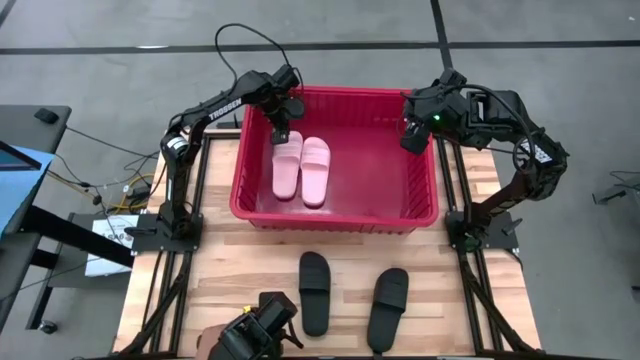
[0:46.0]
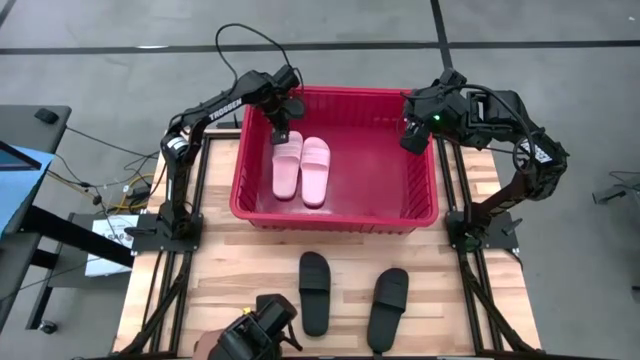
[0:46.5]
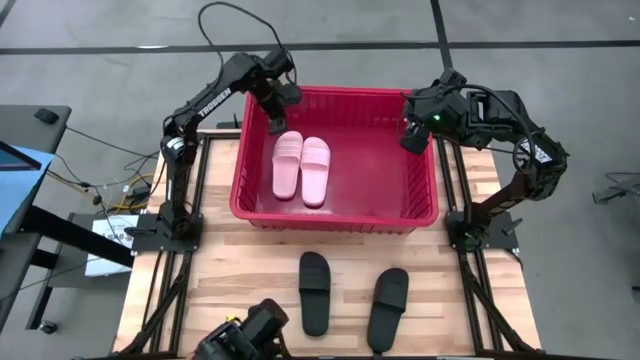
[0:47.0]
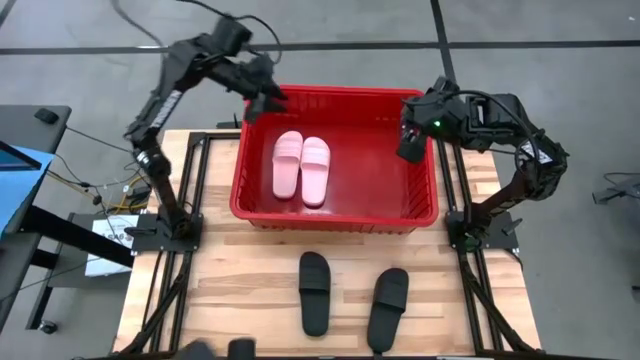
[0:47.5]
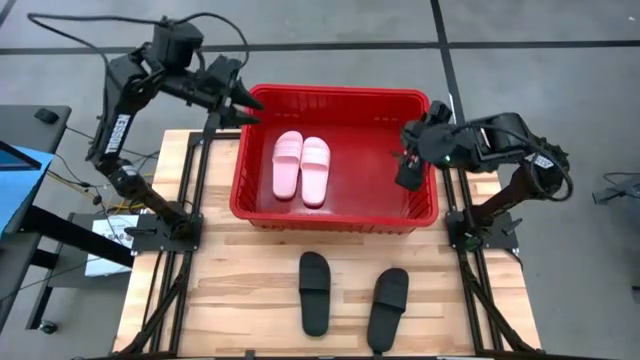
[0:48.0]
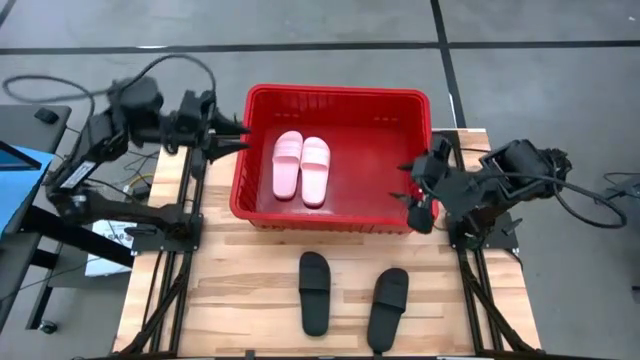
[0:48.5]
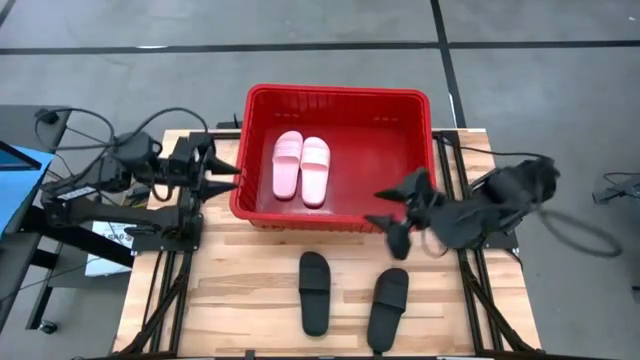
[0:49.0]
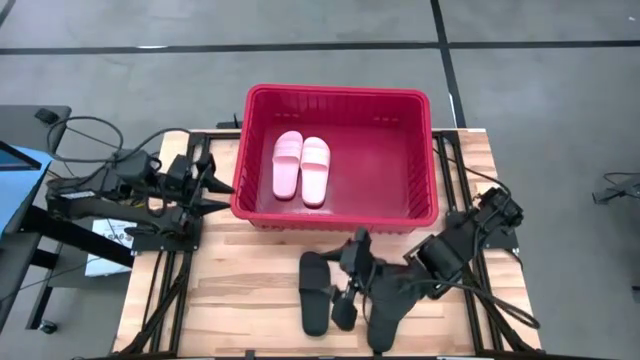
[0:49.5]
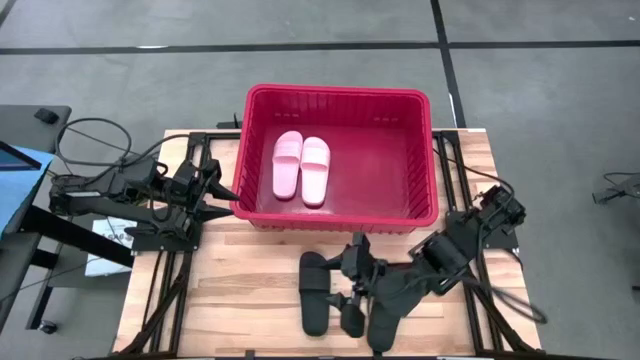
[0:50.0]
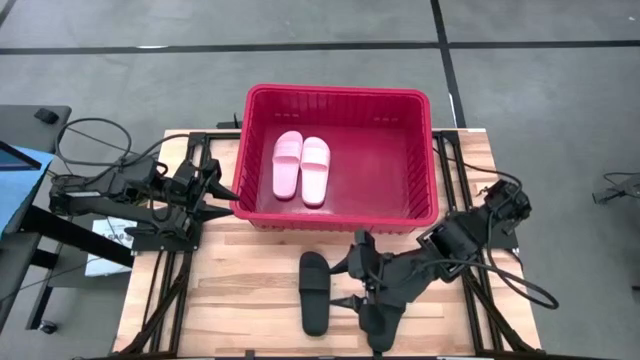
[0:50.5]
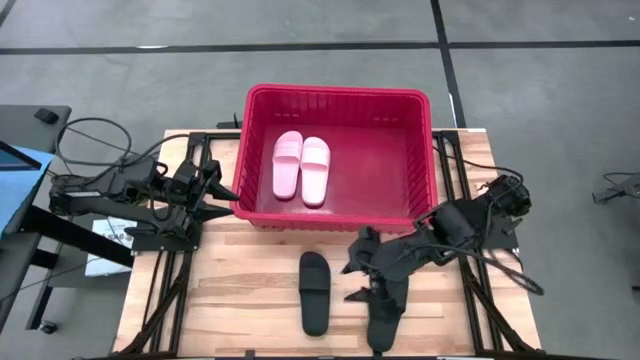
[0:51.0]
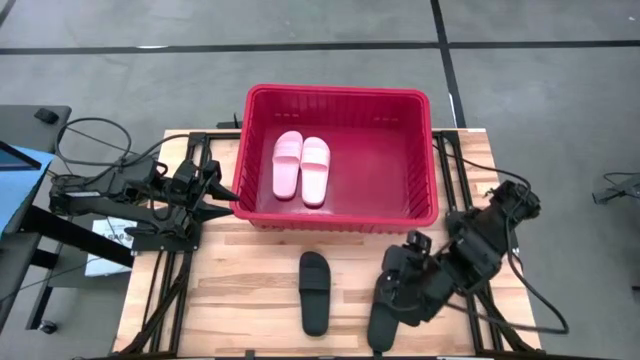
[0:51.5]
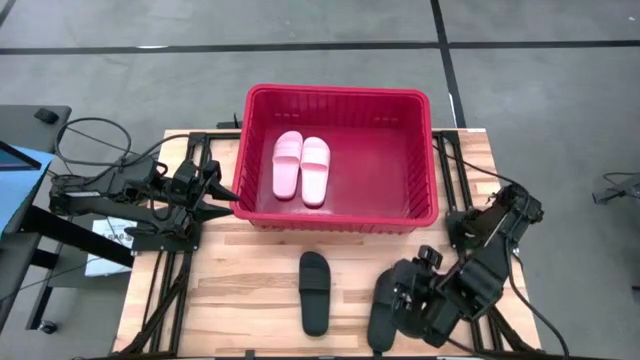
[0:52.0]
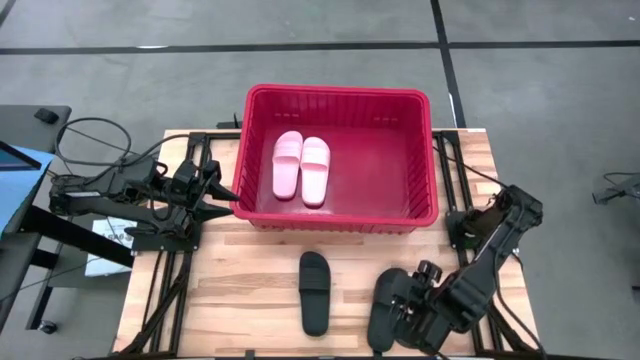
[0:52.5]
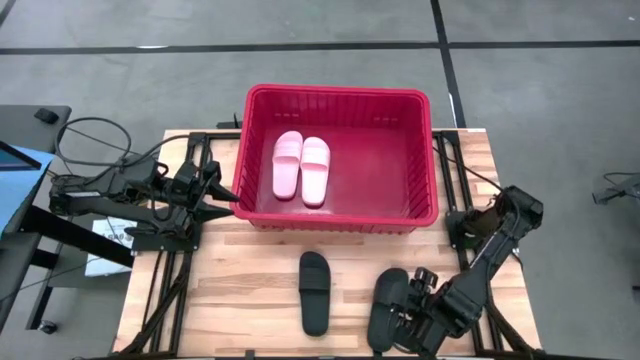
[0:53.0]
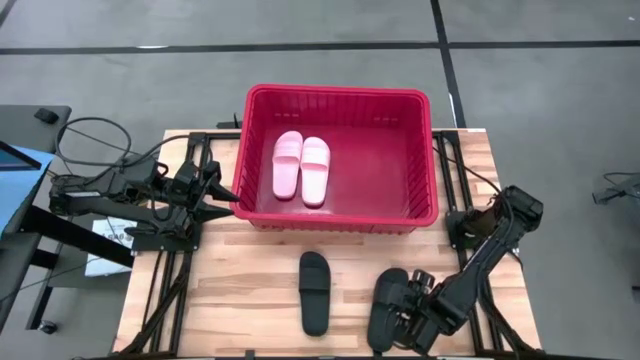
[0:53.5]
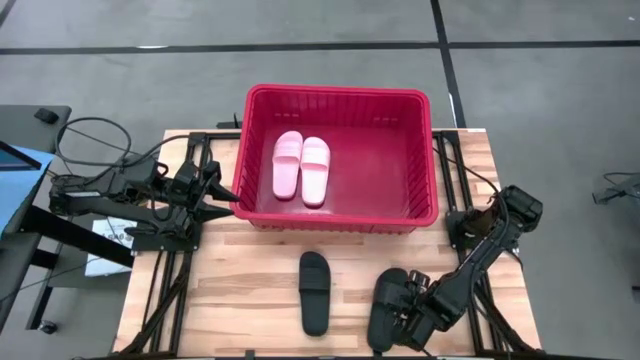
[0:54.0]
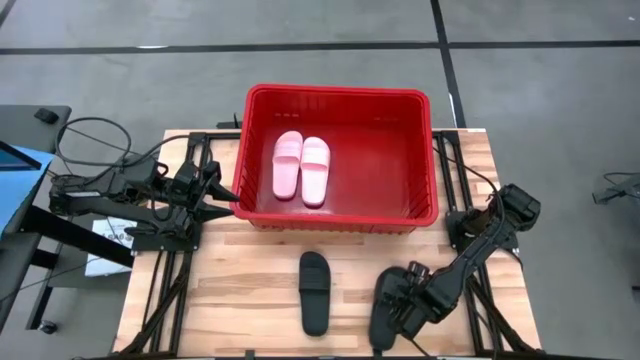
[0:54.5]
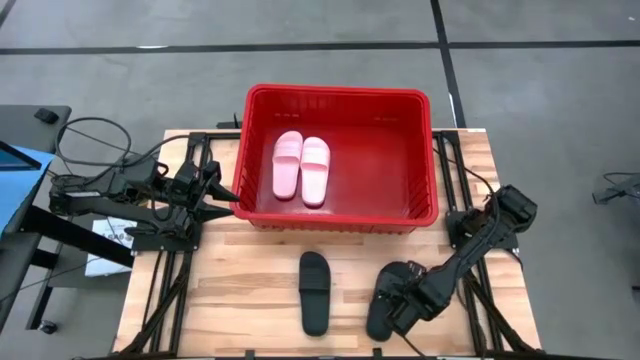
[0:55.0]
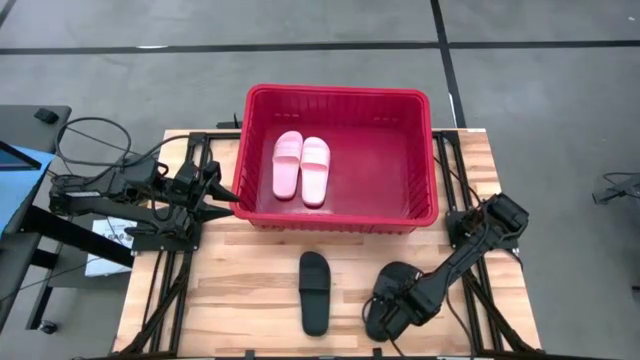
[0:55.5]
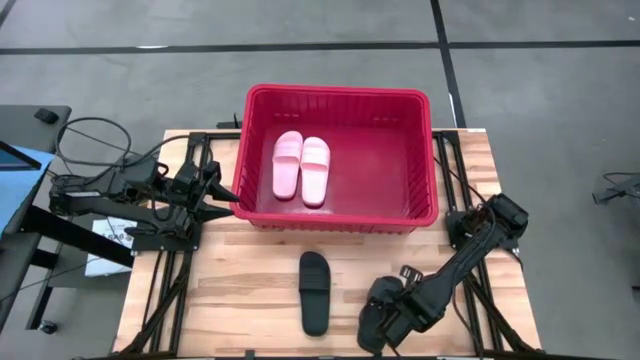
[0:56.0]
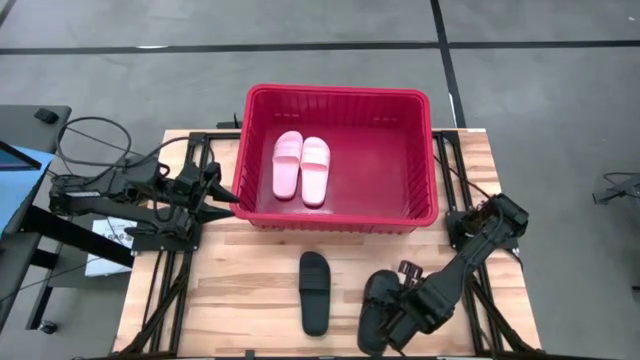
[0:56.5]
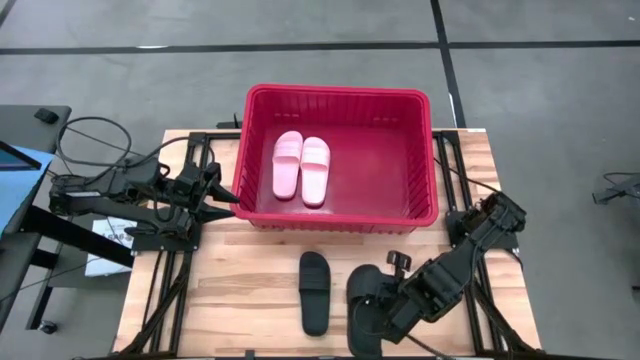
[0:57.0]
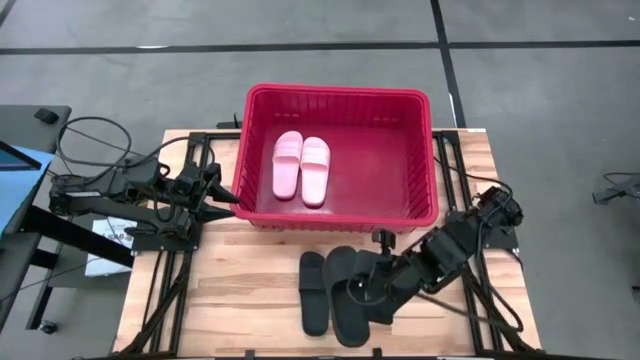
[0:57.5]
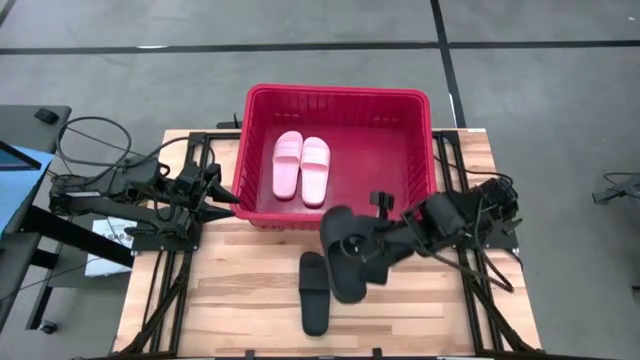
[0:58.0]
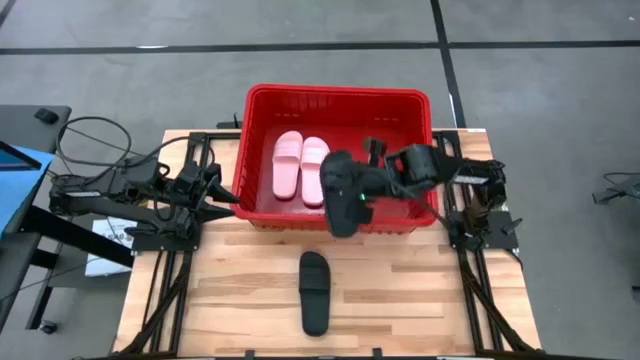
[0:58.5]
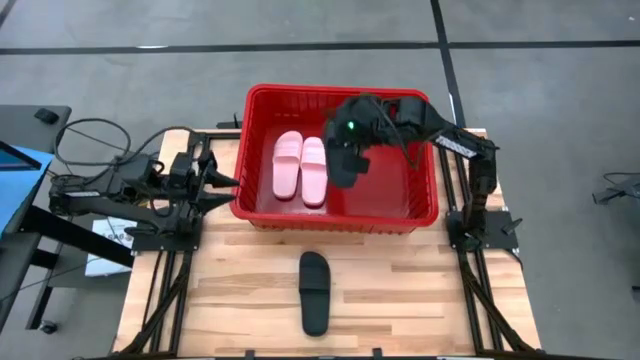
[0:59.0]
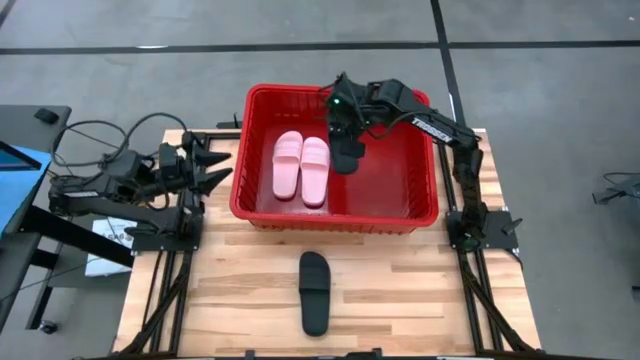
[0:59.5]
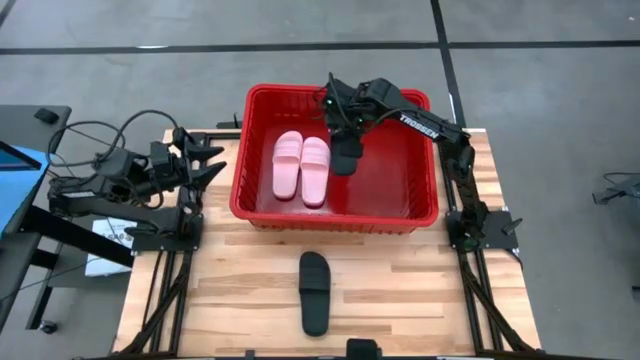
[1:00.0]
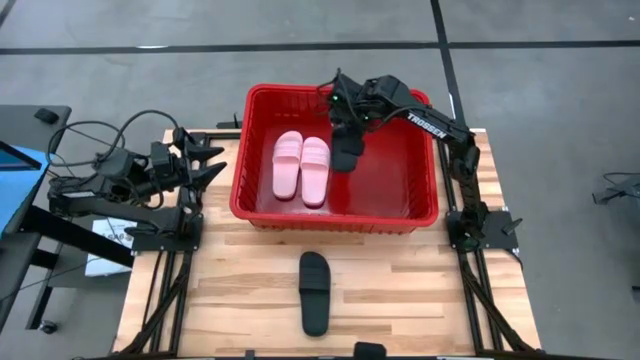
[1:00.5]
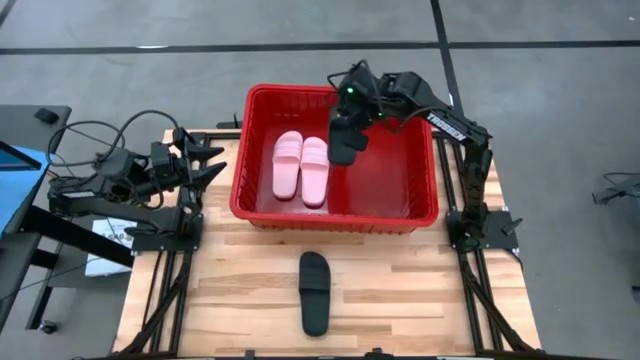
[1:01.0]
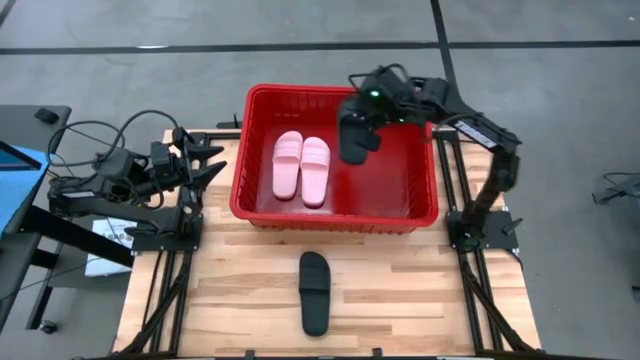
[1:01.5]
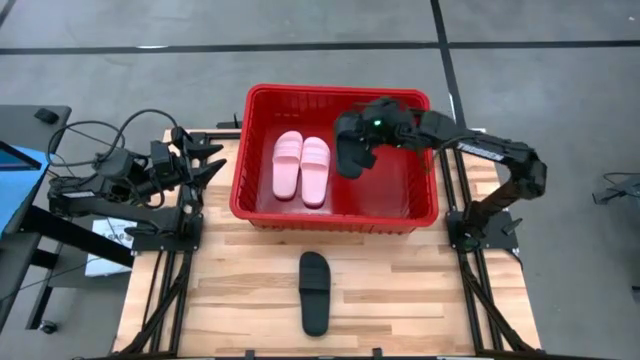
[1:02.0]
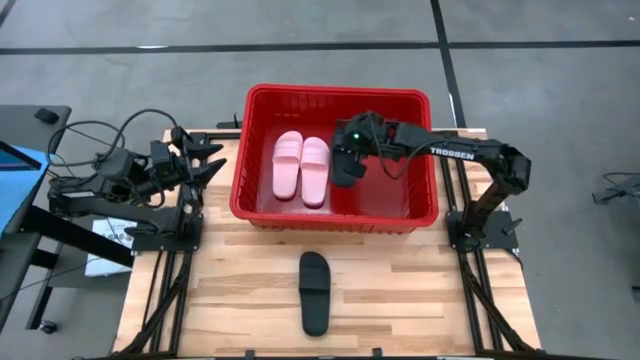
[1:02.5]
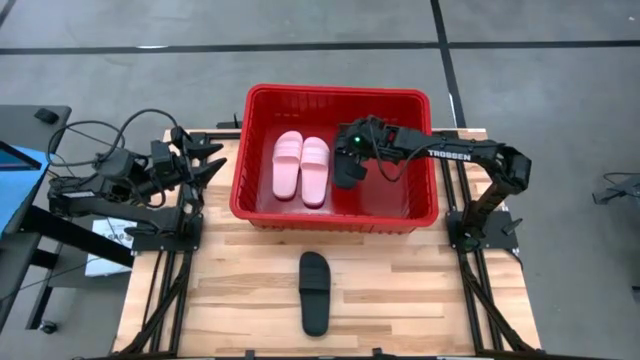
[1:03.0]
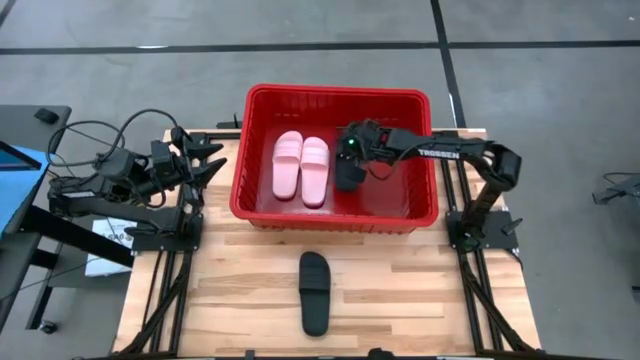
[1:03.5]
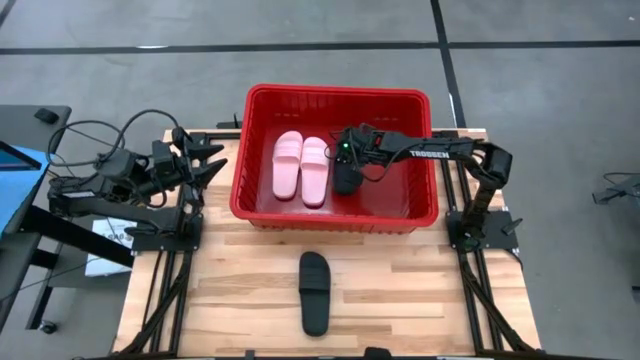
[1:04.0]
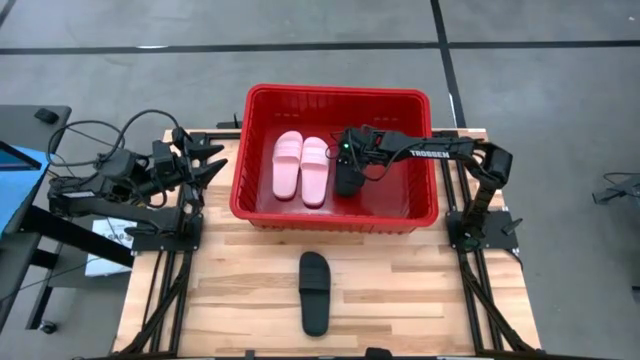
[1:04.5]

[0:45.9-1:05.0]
Task: Pick and place slides into bin
Put the right black slide into the red bin

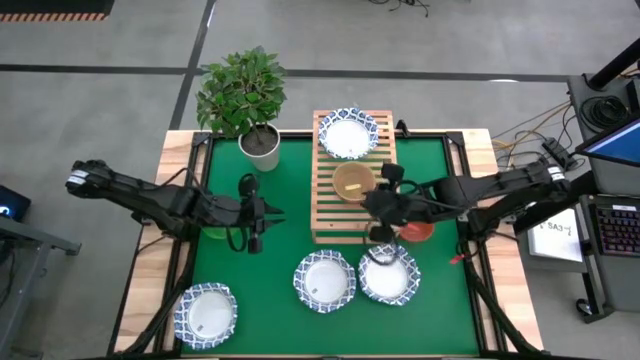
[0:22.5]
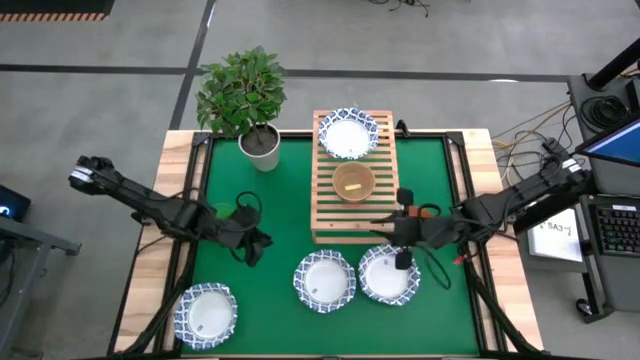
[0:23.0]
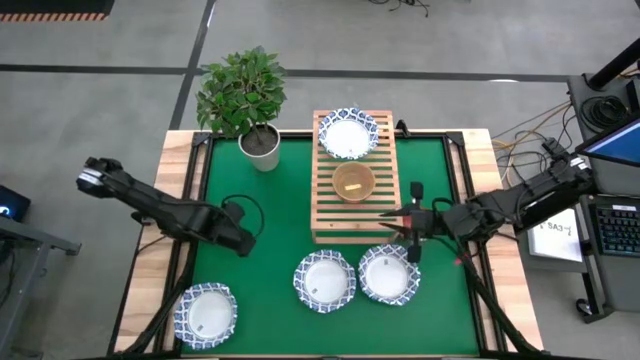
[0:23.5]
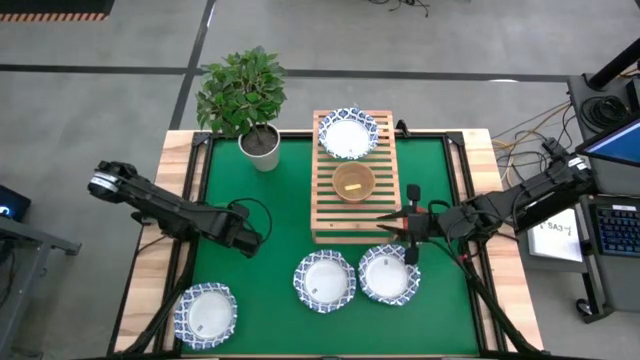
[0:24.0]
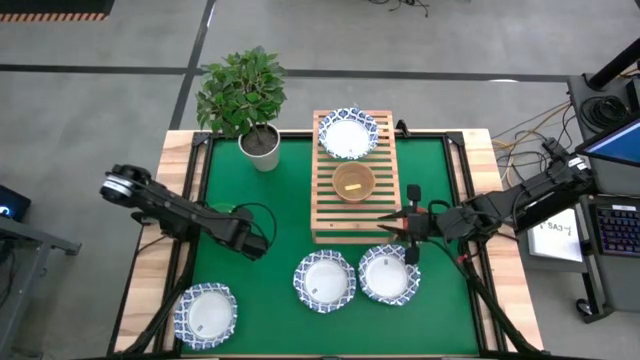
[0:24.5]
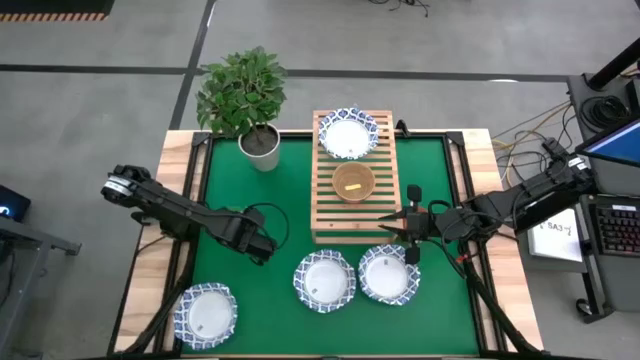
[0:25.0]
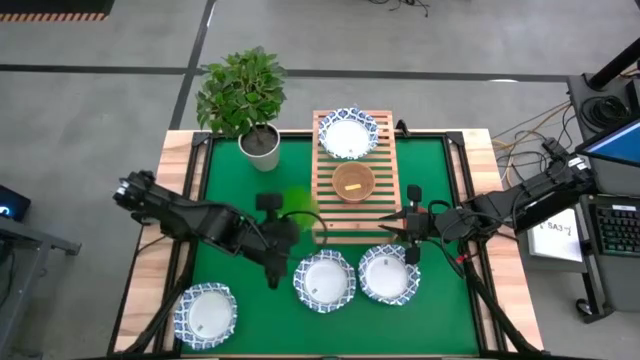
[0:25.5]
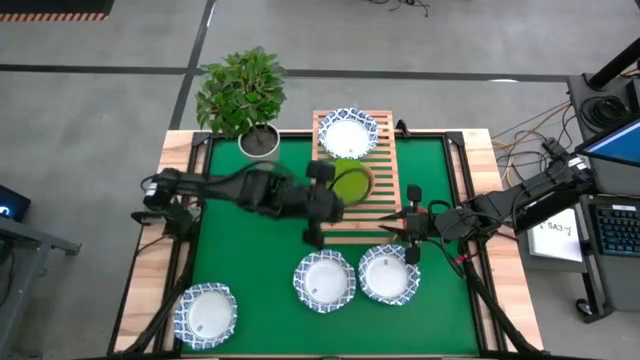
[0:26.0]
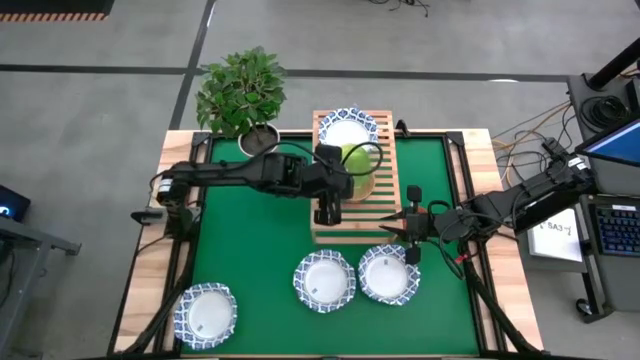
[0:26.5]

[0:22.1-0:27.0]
Task: Place and stack bowls onto a shelf
Stack the green bowl on top of the yellow bowl
